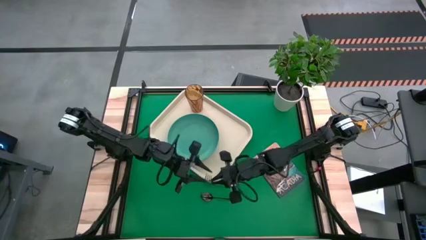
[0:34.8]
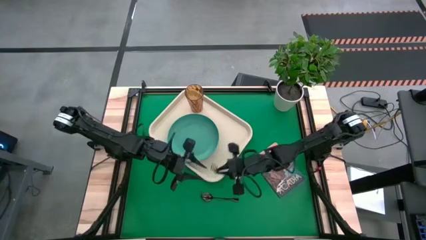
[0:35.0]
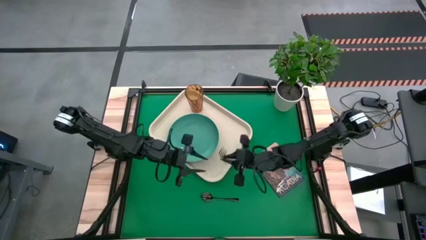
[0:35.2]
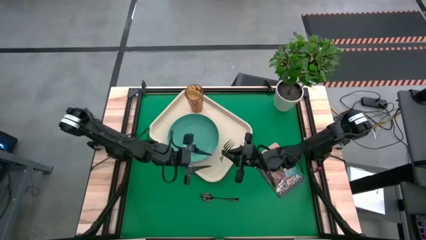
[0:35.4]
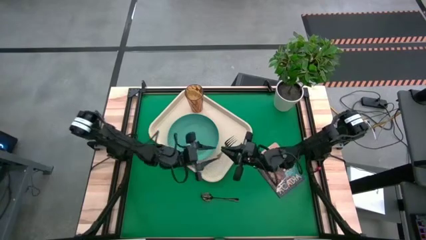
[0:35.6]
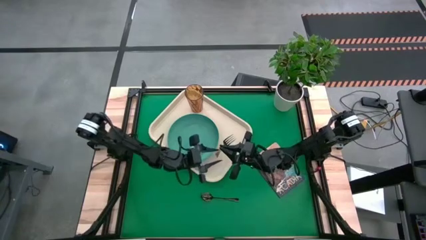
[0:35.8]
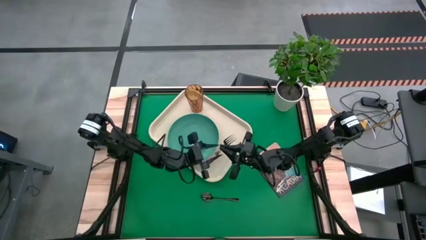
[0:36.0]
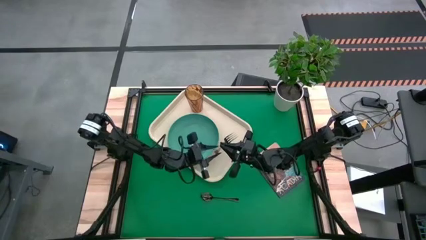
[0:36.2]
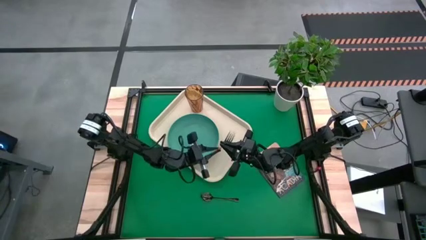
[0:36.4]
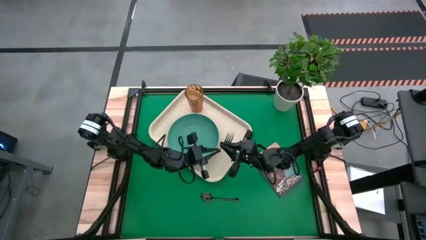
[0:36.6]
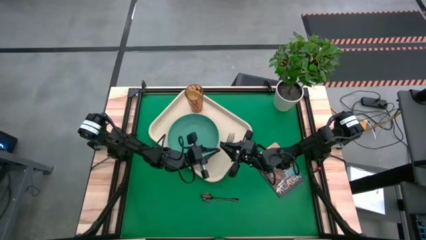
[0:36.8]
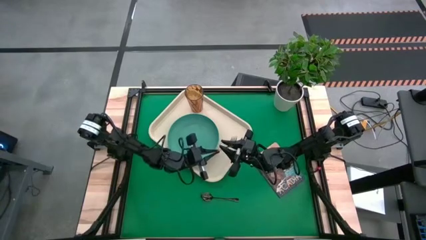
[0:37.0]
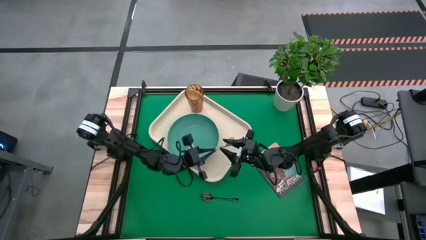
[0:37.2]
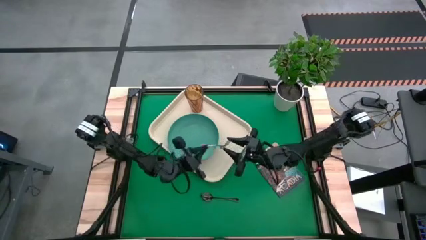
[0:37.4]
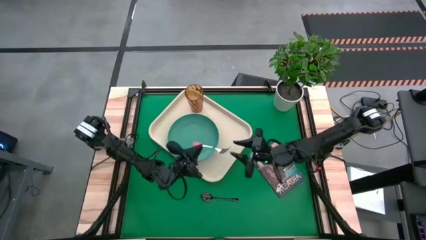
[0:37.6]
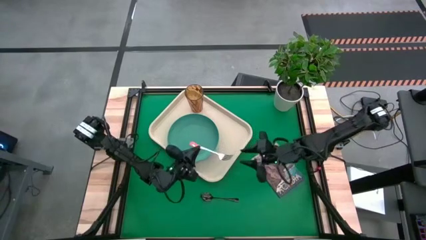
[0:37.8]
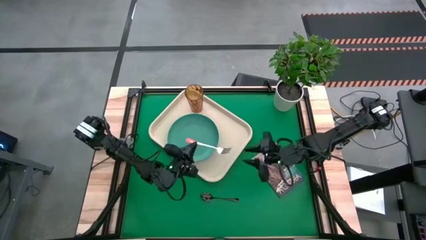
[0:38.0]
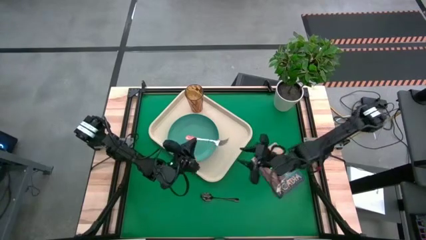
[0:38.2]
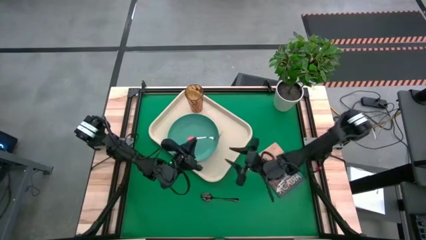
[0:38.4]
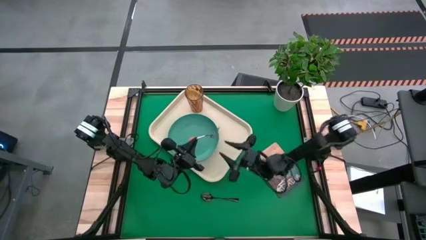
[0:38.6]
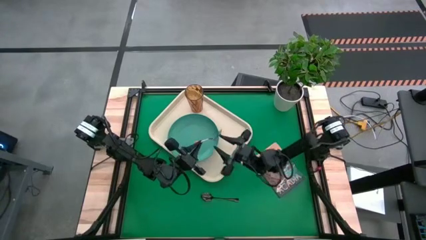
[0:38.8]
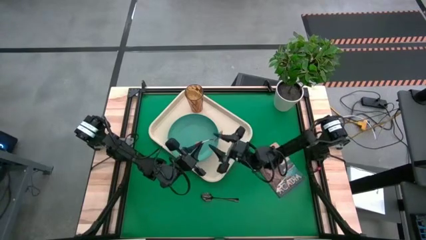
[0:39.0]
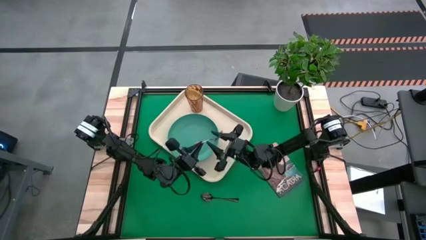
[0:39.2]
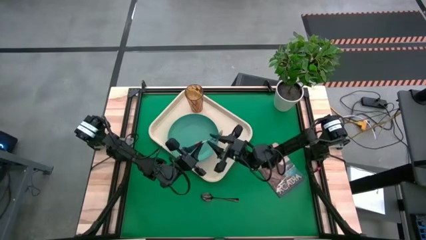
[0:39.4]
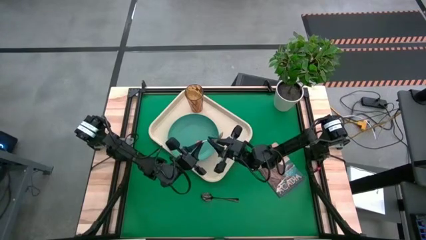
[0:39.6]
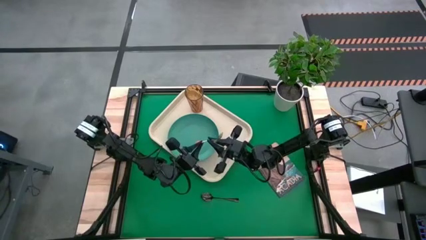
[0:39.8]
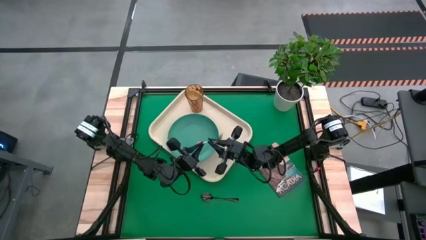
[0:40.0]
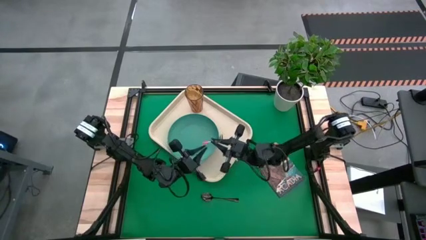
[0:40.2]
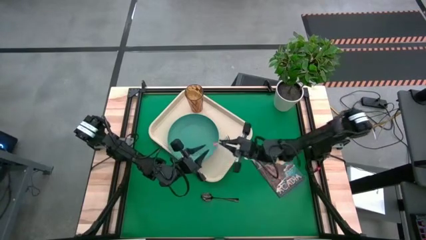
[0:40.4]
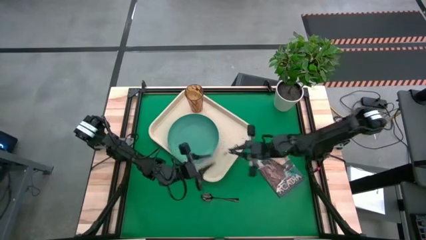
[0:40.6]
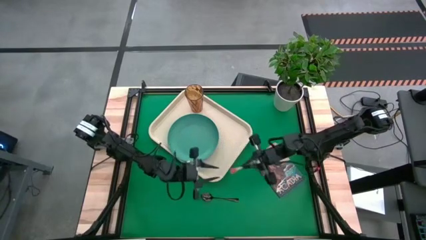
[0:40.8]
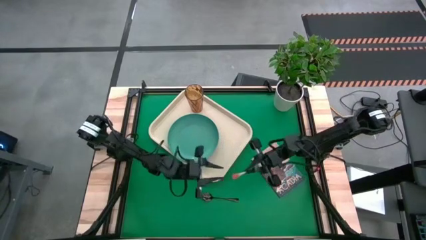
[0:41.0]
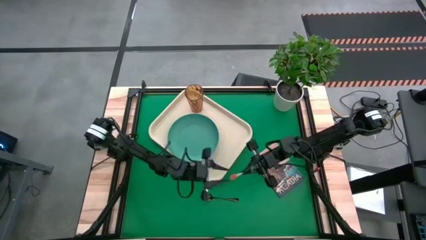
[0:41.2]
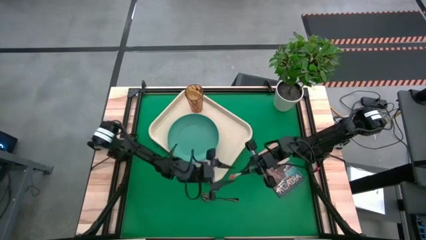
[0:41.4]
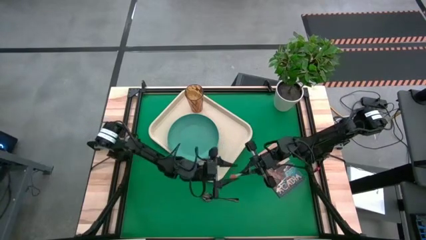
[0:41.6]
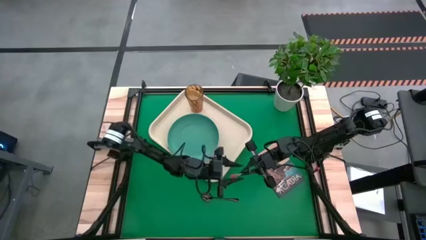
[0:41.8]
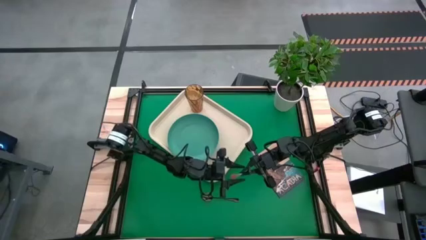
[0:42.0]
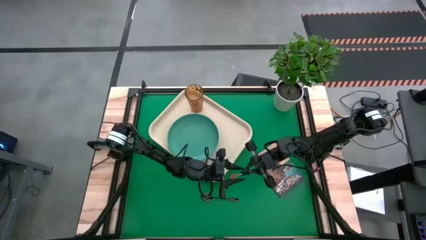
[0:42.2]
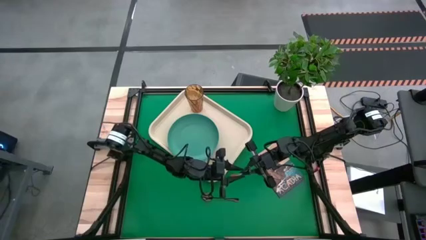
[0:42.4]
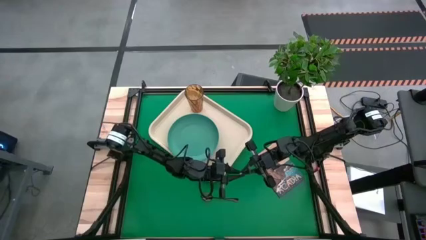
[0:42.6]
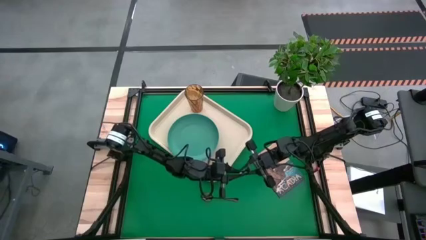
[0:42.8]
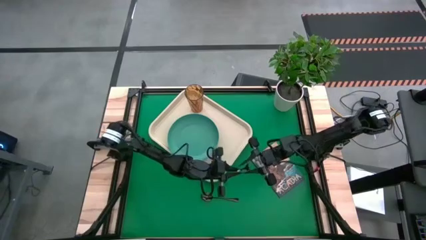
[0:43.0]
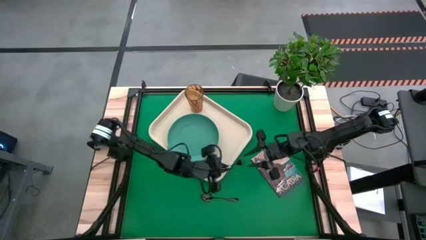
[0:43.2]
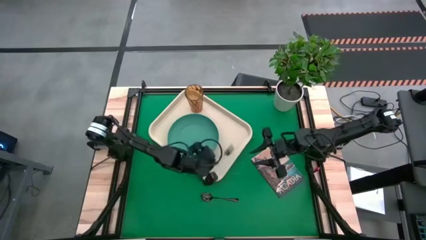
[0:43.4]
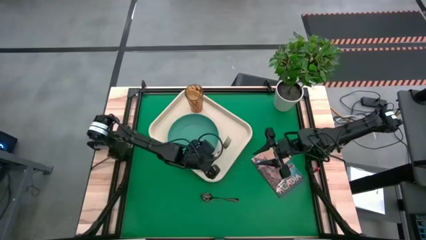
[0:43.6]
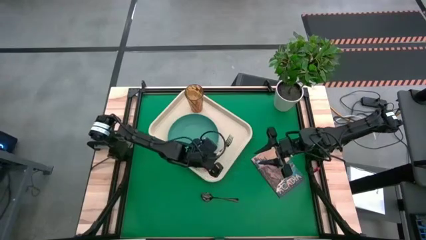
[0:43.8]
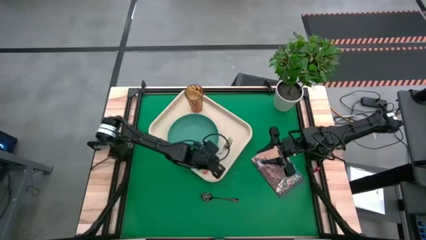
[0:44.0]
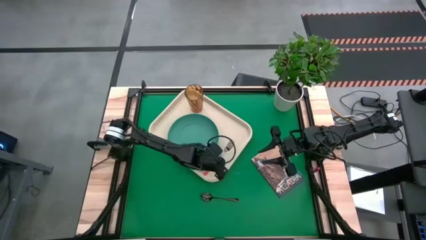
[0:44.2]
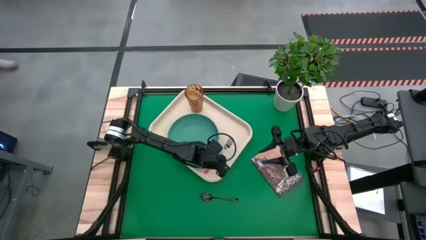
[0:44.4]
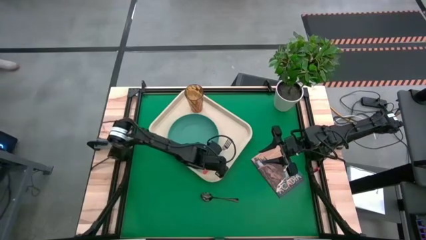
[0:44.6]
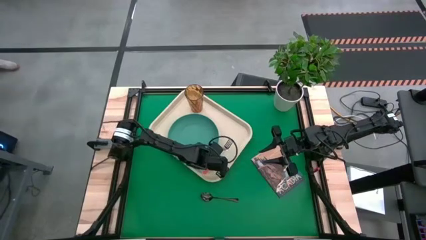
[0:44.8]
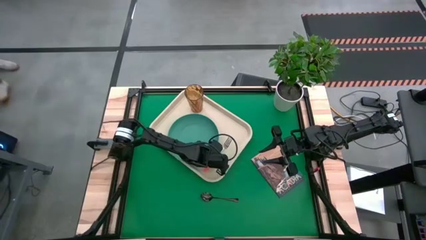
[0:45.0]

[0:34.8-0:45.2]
Task: Pick and place plate/cup/fork/spoon on tray
Put the orange fork on the white tray to the right of the green plate
